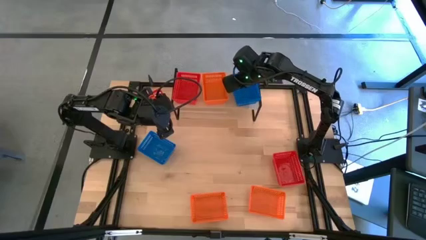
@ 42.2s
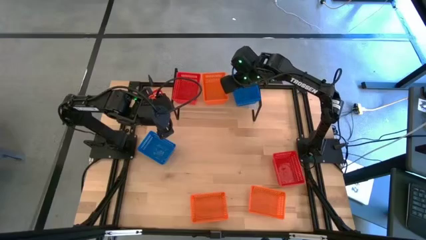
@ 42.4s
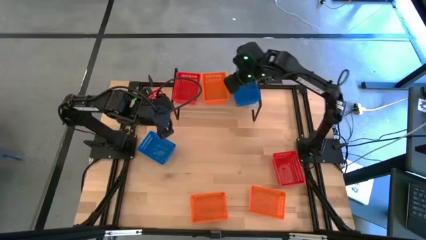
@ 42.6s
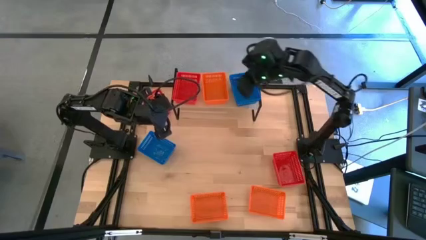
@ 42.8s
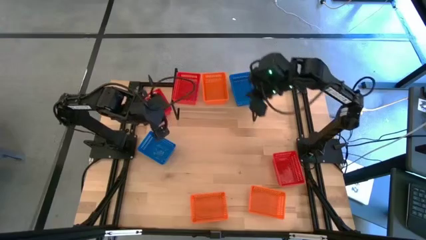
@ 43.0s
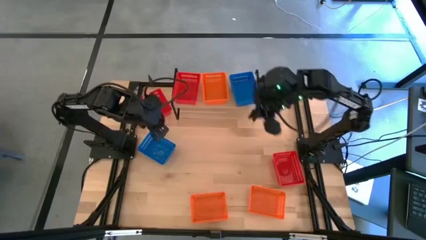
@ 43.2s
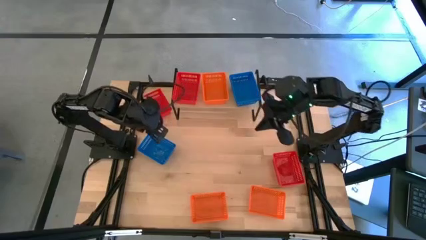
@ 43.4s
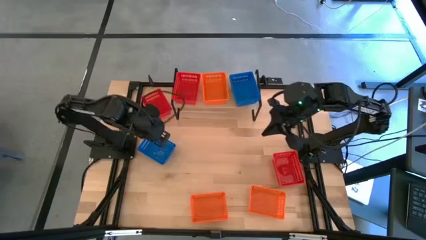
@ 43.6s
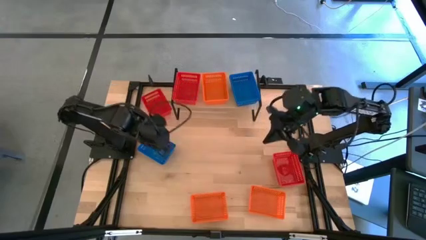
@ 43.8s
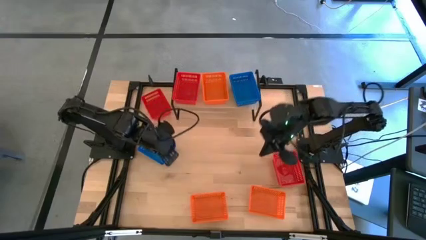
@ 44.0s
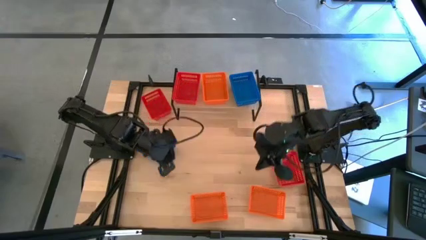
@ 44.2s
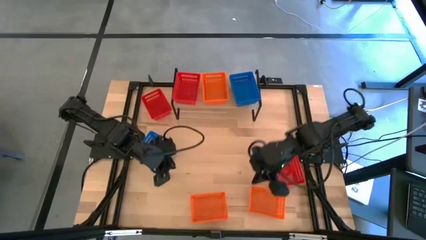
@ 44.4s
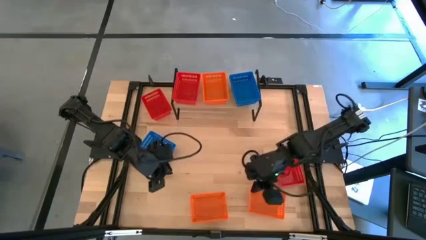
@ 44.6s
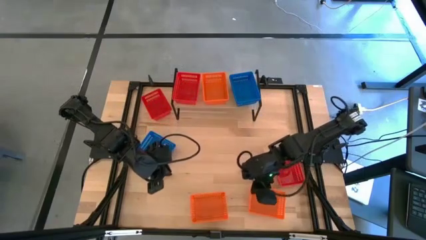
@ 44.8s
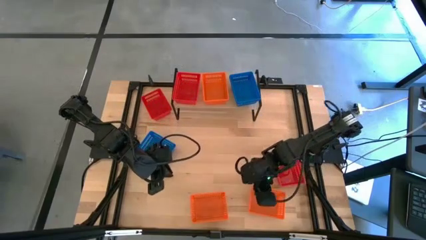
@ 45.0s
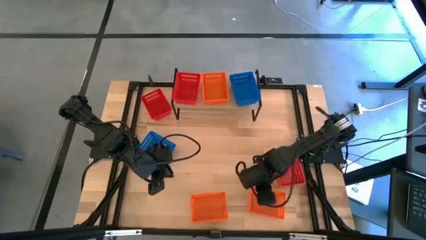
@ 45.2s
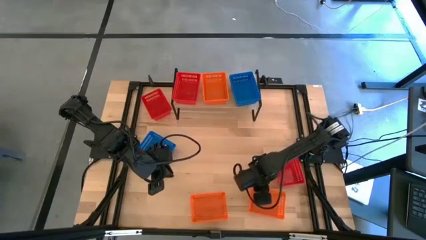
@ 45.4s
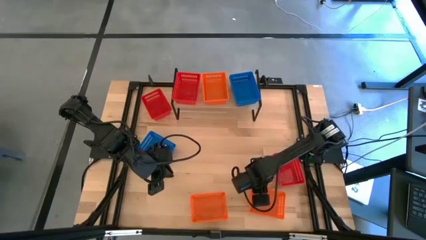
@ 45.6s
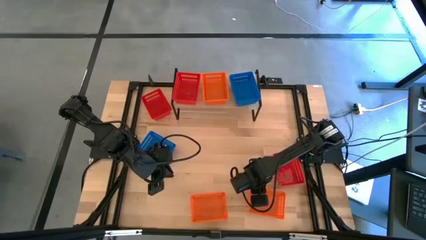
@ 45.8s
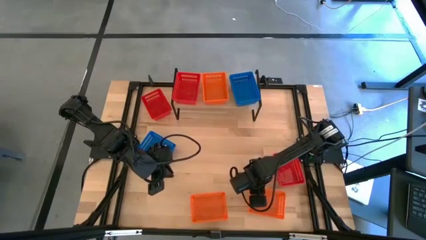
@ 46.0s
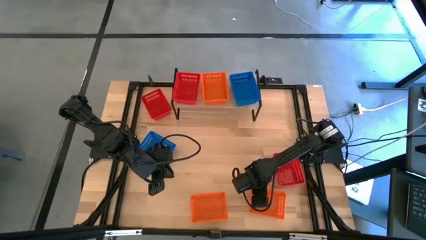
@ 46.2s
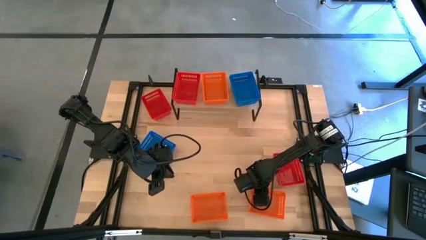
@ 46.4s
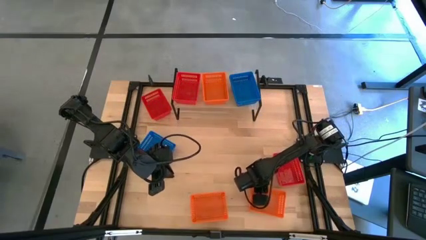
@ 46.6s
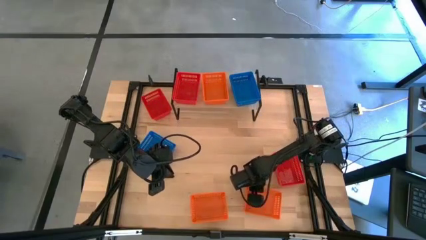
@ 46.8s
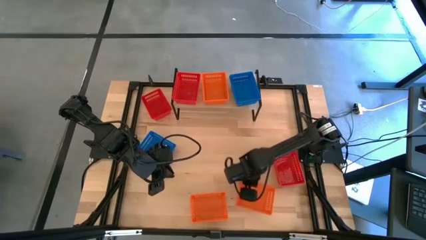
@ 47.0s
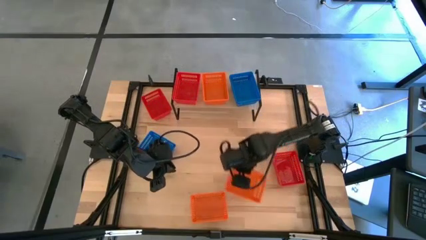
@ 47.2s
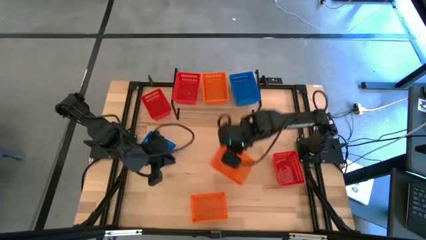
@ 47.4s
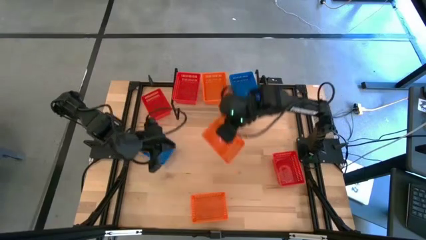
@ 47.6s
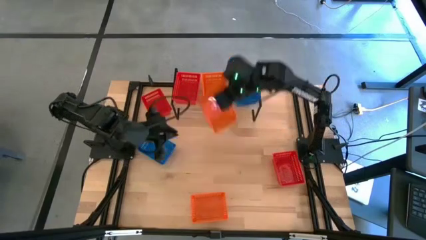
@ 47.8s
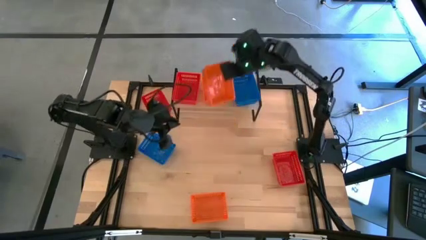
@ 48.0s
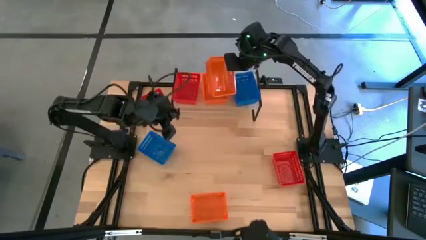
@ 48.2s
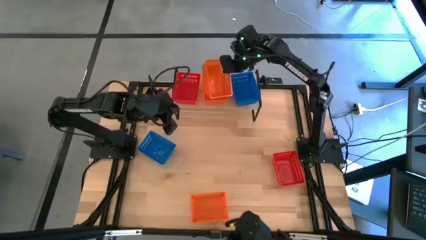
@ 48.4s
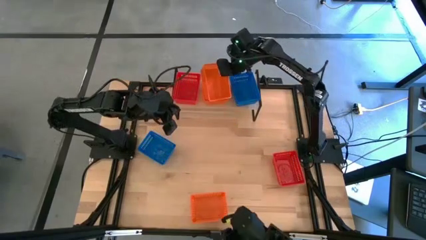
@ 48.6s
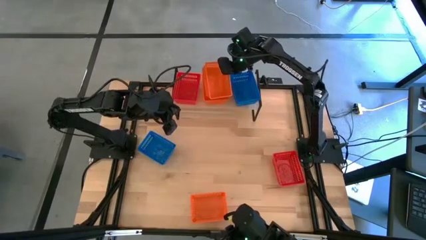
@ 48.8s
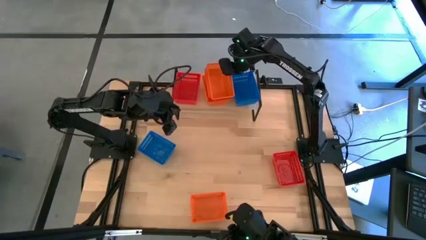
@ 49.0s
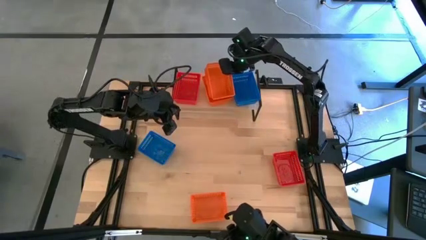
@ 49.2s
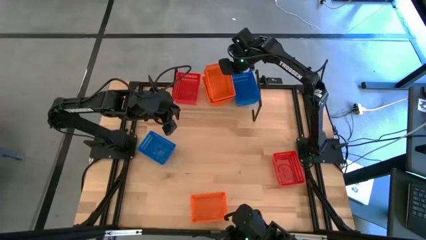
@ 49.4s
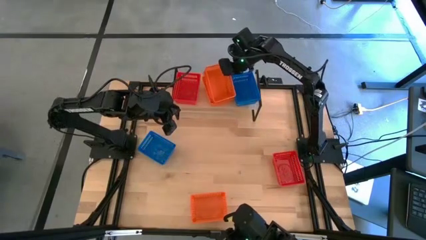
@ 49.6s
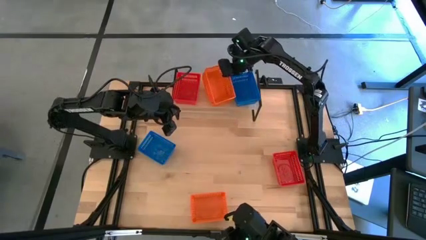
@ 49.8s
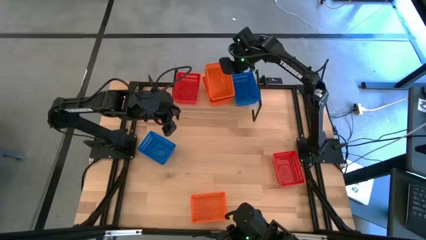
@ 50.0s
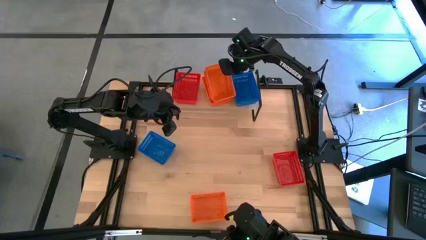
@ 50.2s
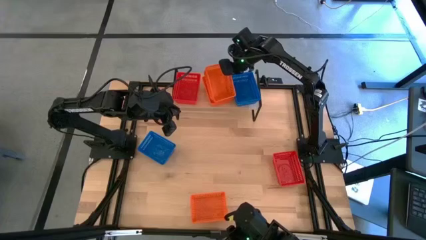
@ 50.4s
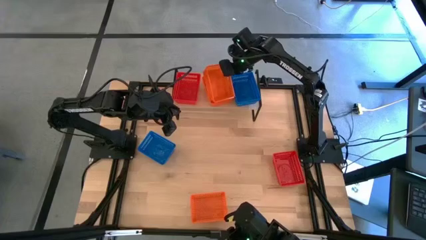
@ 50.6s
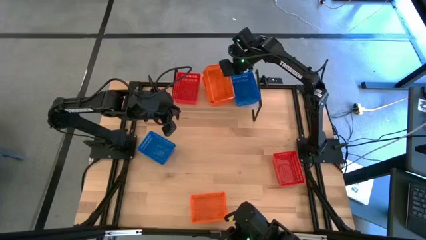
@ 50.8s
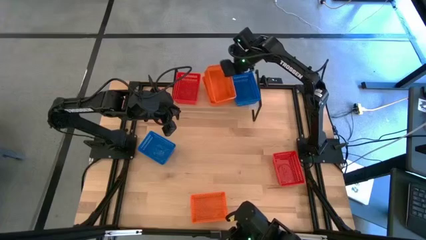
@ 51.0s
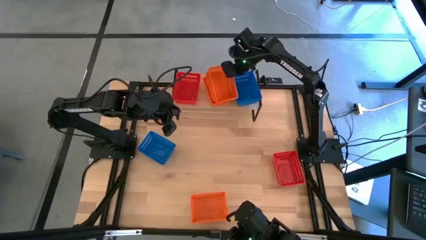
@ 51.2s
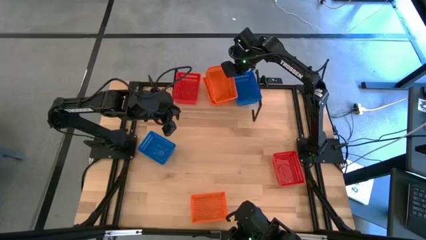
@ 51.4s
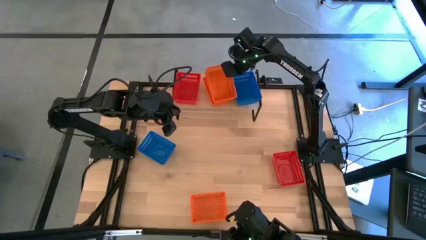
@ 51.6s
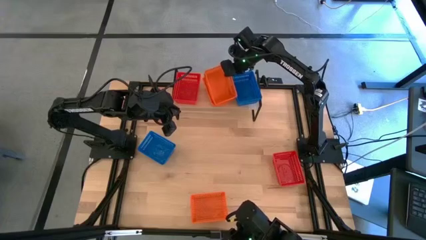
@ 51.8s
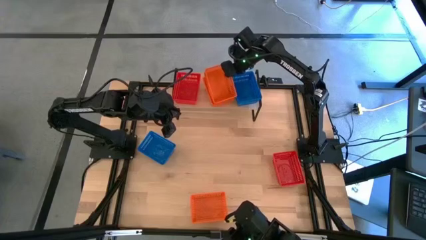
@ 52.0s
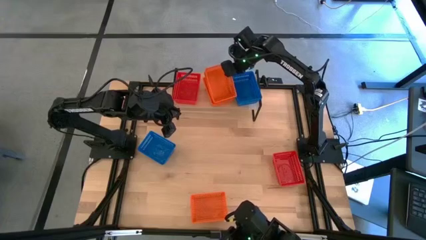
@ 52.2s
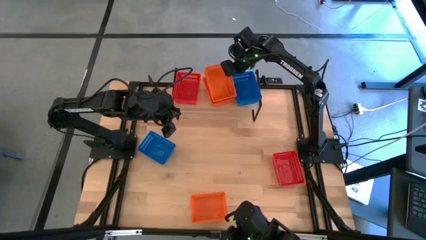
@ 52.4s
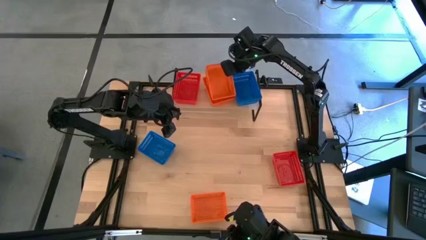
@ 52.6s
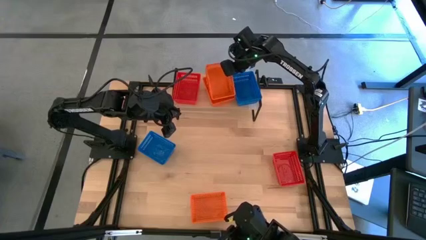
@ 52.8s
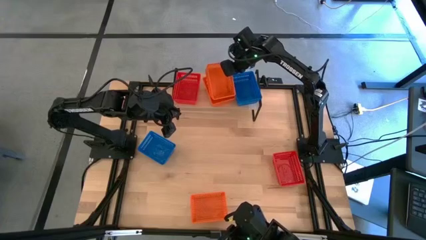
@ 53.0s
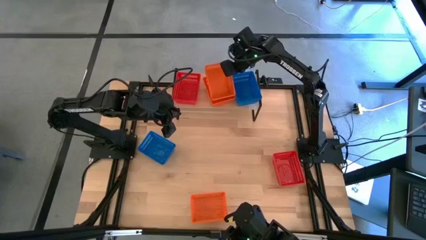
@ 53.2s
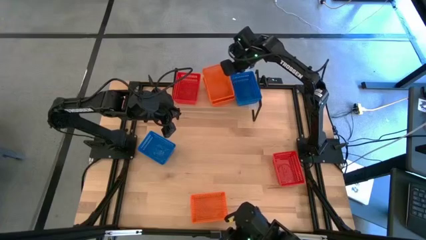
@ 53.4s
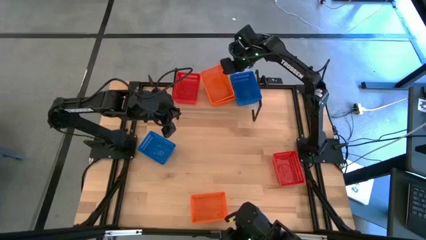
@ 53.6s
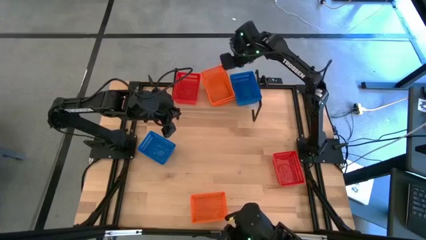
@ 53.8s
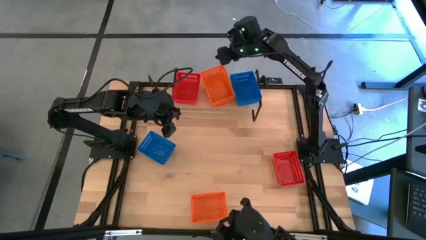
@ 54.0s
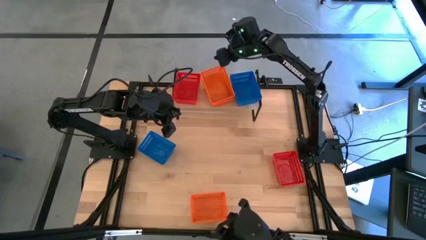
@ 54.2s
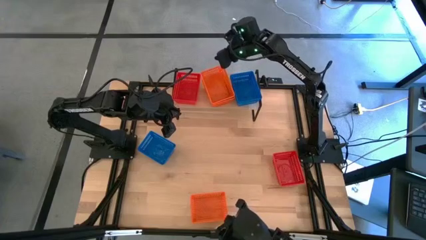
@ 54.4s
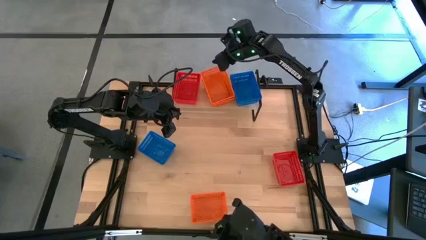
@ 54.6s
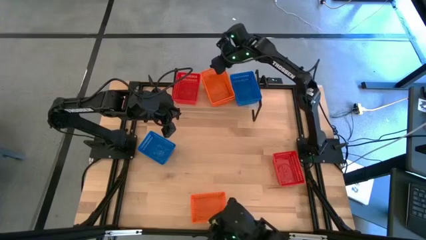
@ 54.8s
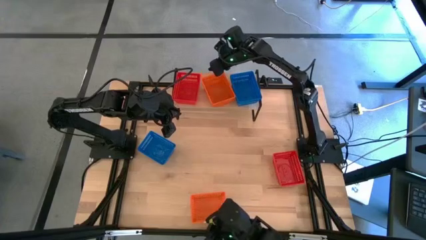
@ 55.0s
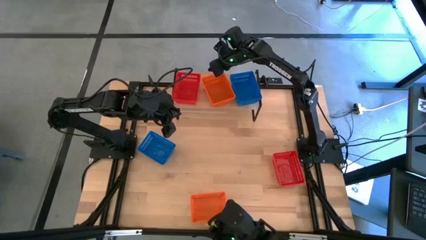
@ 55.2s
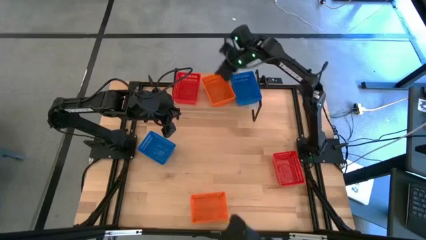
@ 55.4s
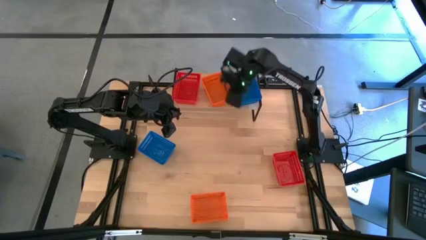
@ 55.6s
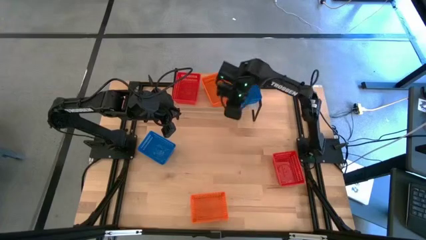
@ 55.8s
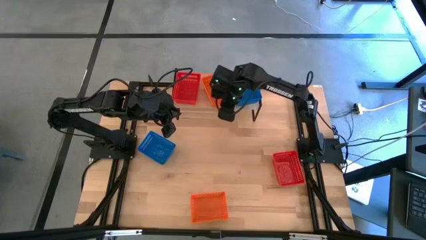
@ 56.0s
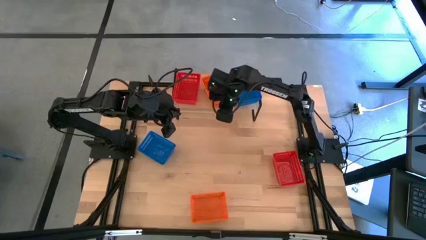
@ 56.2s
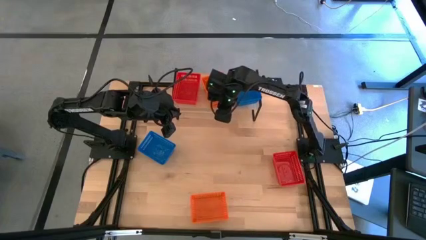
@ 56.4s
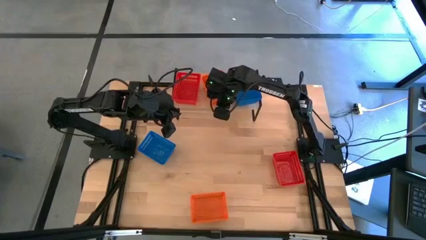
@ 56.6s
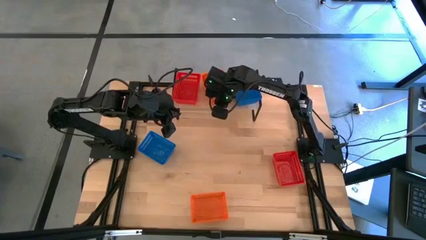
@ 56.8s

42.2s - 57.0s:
Task: Stack baskets on shelf by color
Stack the right orange basket into the orange basket on the shelf
